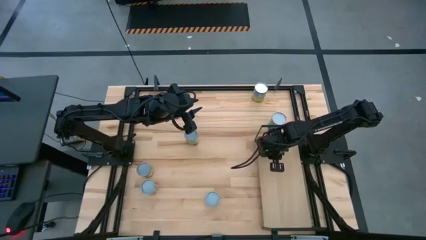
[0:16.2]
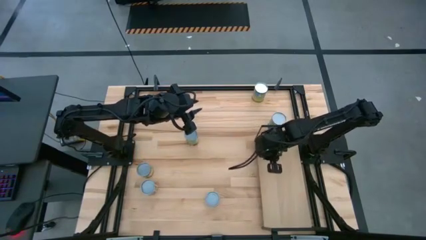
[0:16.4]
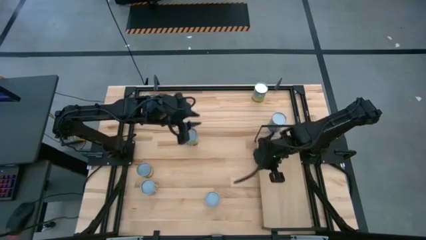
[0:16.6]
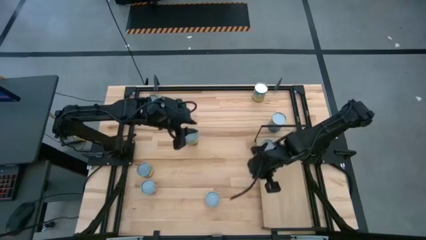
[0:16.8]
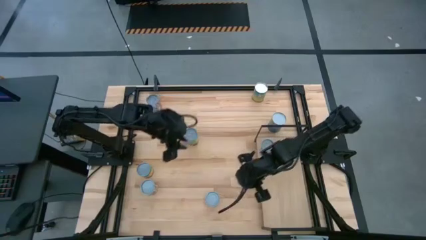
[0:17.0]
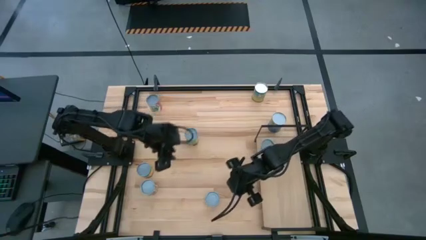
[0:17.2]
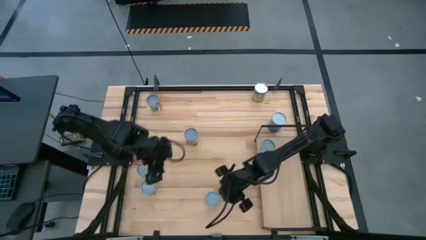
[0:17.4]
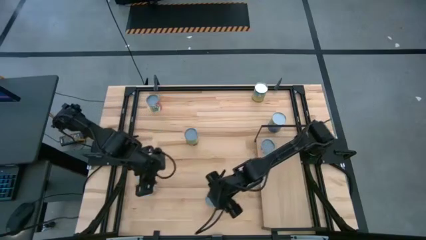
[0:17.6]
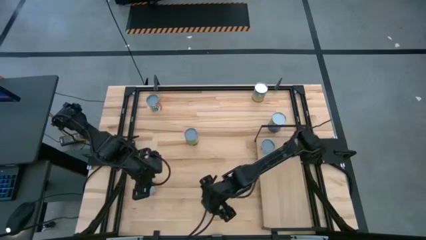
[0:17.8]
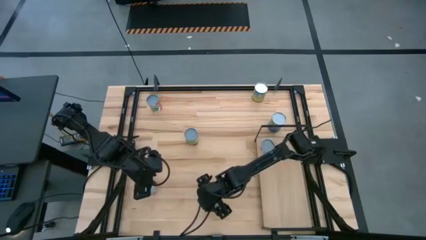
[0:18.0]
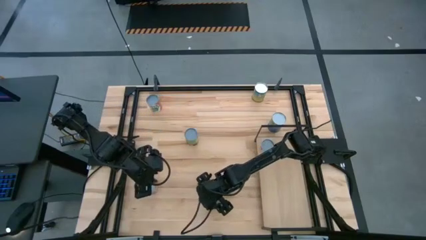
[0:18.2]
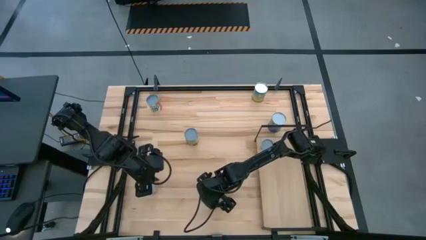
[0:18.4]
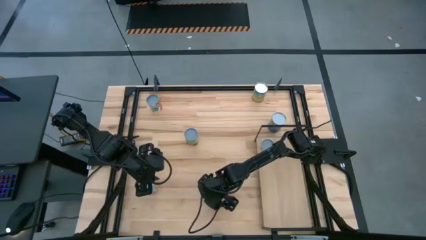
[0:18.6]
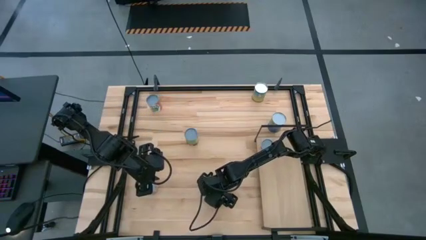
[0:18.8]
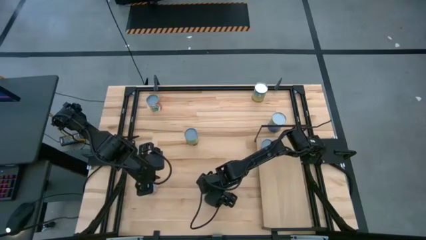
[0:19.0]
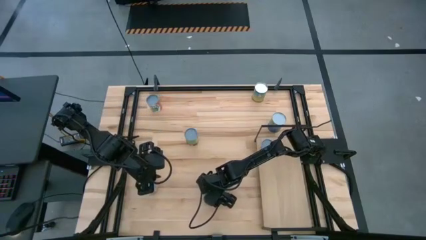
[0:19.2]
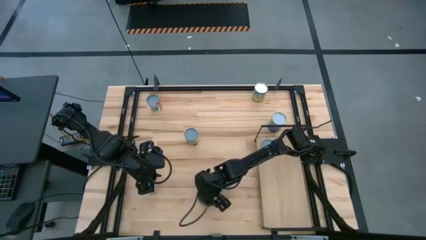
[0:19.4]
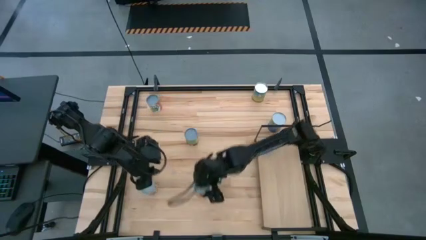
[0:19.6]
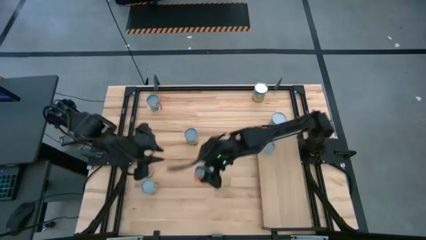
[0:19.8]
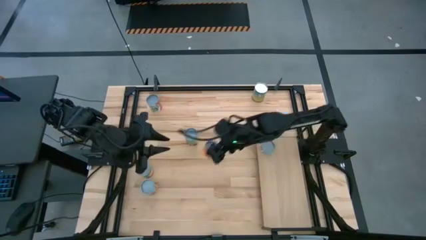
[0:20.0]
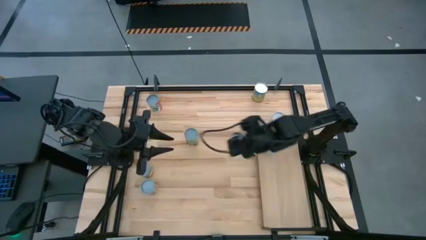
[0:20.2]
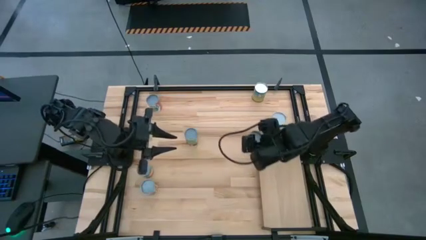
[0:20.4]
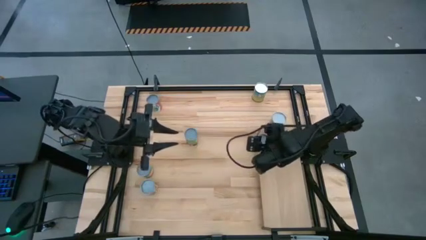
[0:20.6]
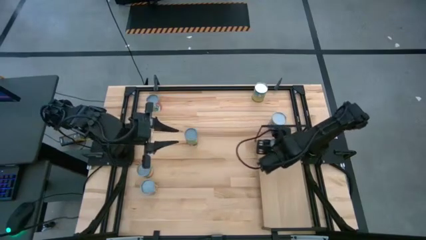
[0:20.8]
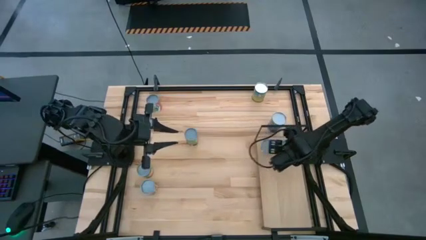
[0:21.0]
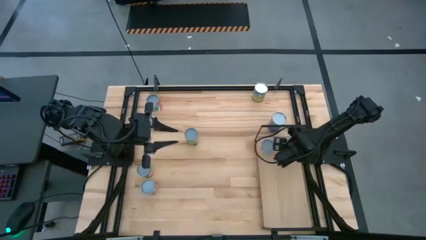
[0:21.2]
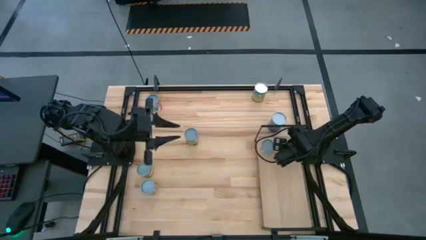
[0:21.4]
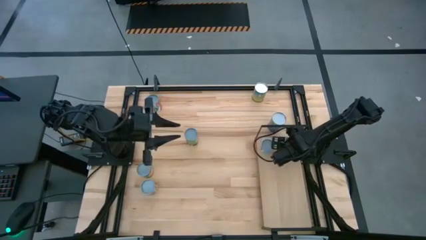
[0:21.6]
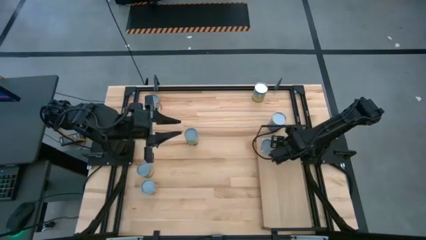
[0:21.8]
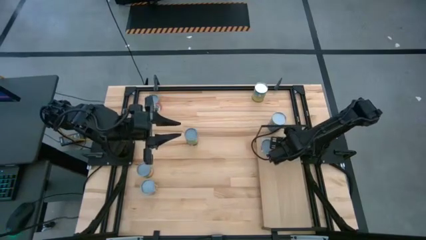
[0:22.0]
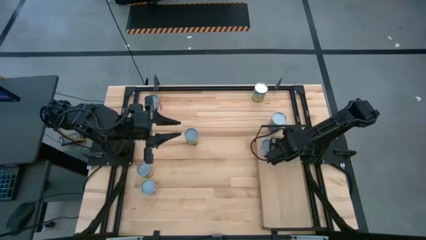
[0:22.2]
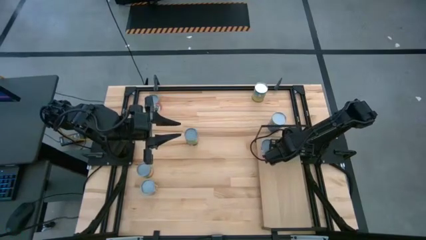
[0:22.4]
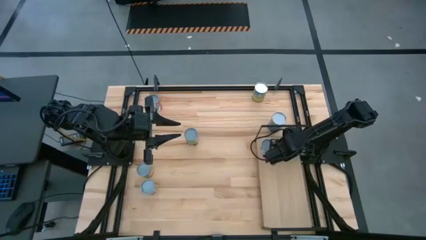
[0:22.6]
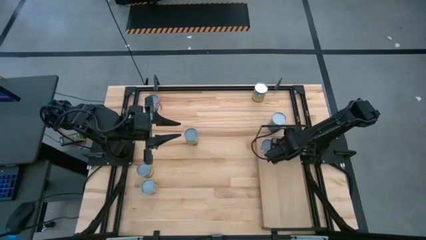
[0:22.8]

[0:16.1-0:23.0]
Task: Pick and place cans onto a shelf
Put the canned pineapple on the shelf

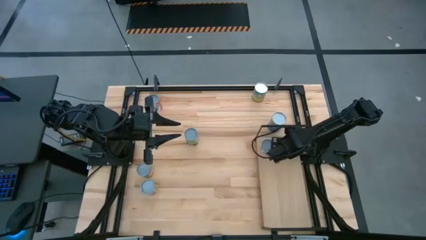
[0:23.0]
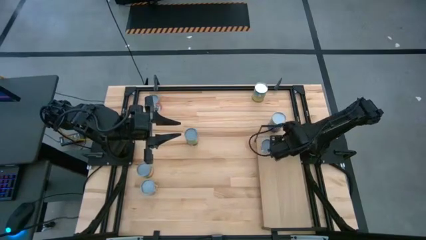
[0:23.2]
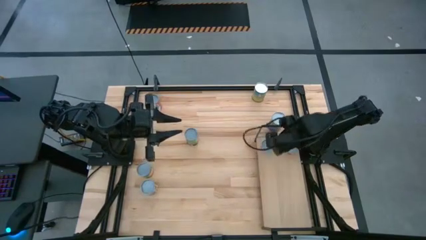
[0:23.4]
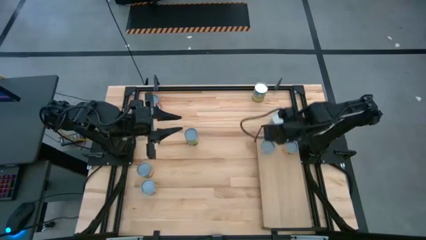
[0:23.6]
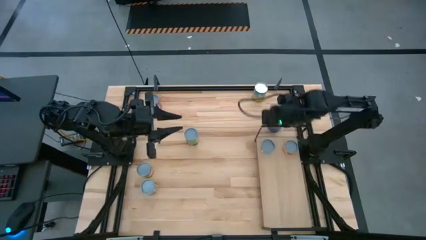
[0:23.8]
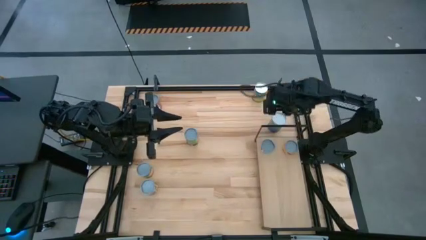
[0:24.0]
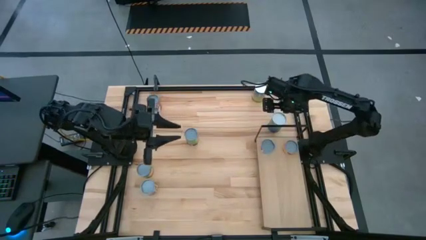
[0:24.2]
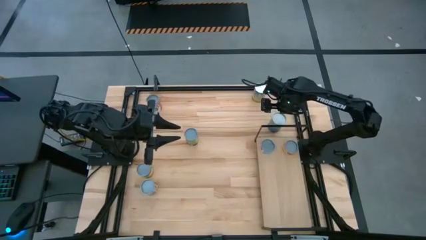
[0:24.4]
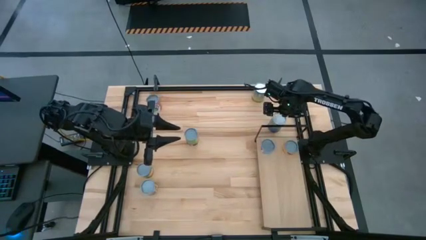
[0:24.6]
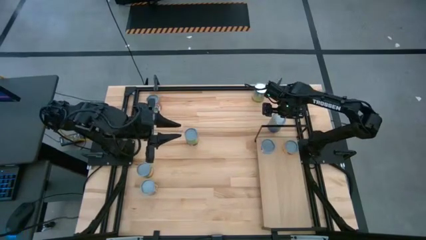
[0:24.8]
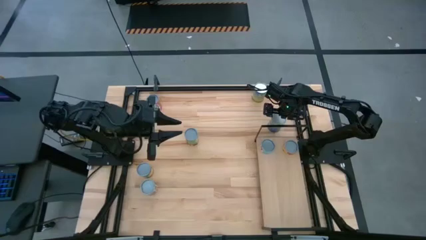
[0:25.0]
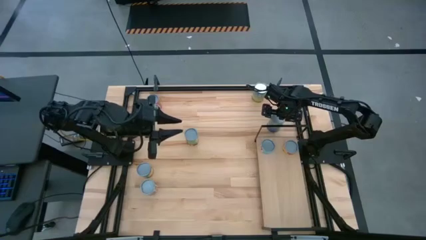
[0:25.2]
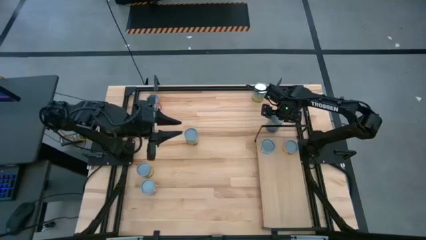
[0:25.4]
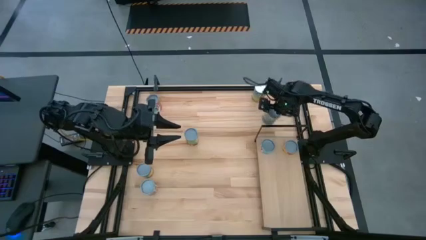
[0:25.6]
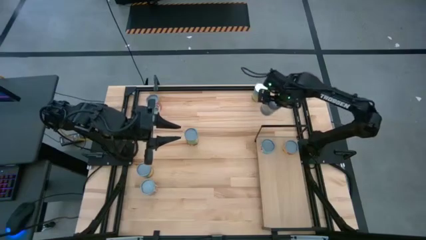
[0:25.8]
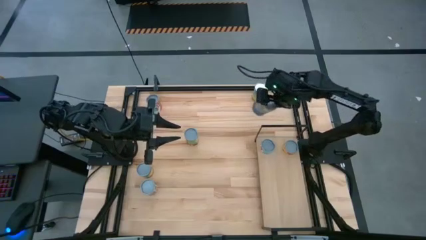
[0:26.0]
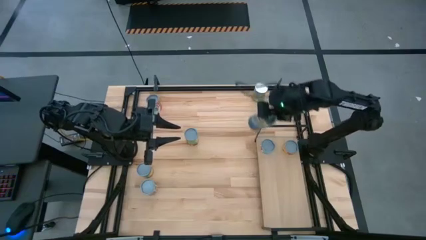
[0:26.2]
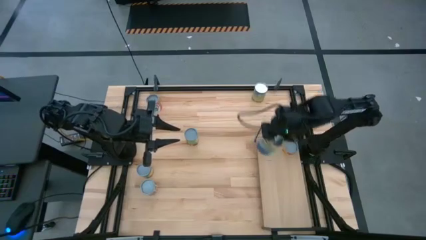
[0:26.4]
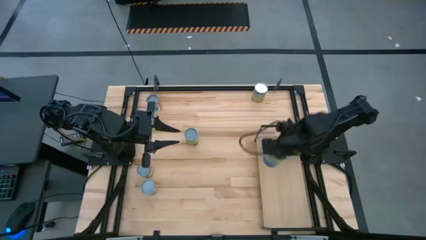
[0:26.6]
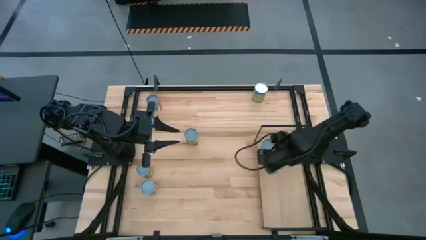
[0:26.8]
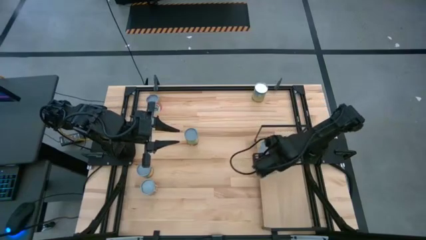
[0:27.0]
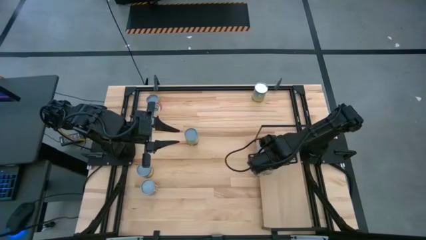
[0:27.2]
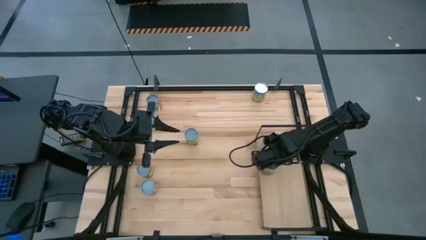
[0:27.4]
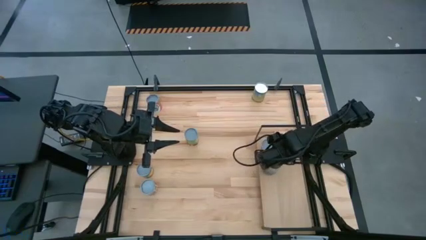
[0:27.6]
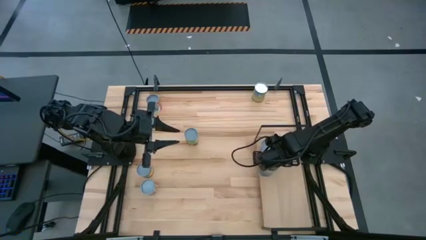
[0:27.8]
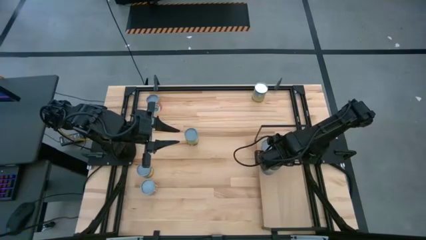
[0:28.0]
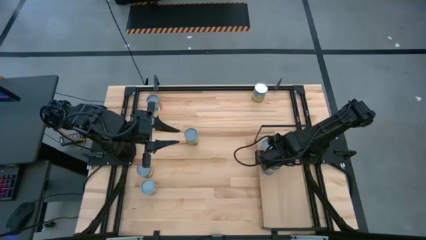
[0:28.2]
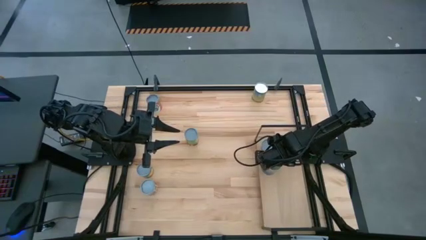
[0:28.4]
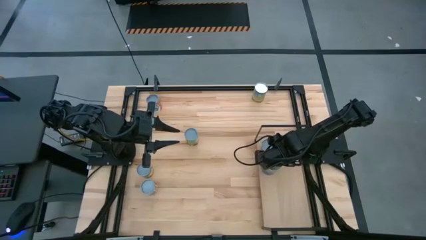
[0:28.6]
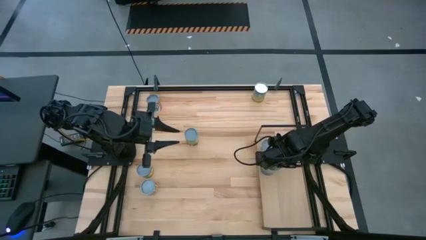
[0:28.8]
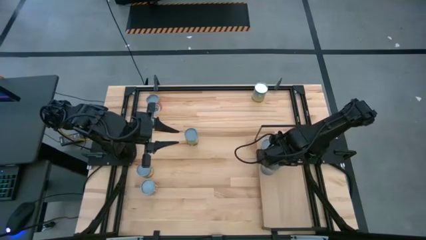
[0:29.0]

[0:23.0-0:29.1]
Put the canned peas on the shelf

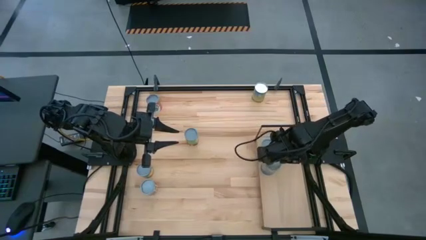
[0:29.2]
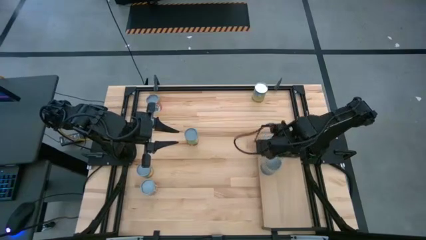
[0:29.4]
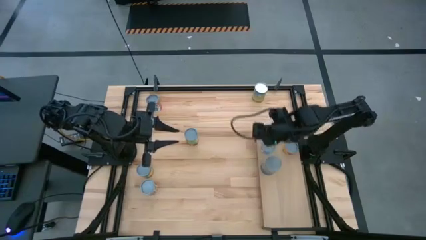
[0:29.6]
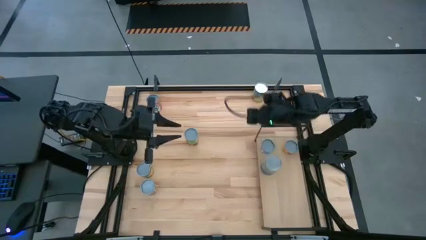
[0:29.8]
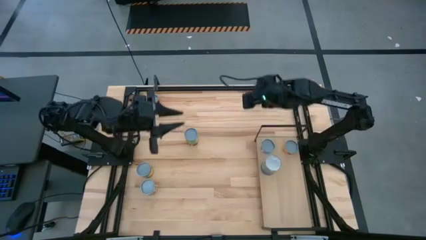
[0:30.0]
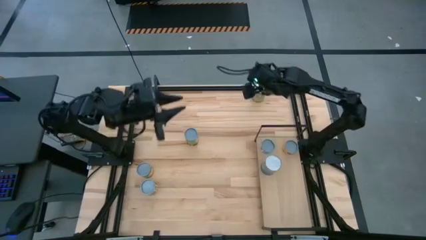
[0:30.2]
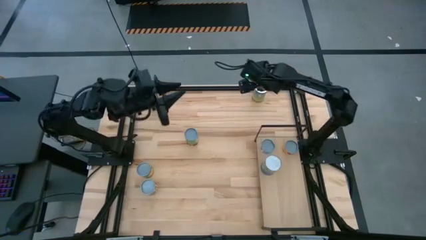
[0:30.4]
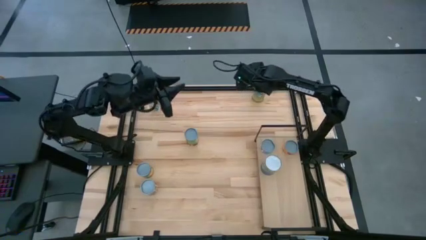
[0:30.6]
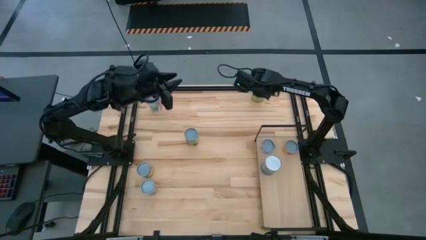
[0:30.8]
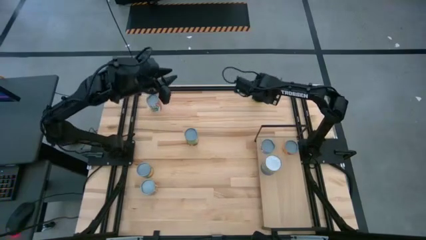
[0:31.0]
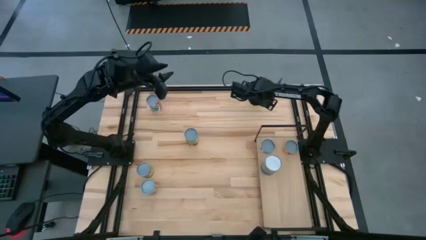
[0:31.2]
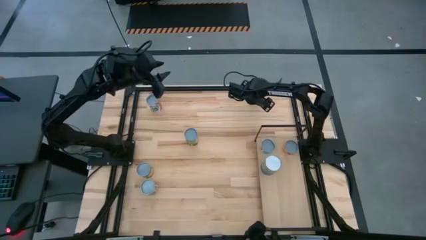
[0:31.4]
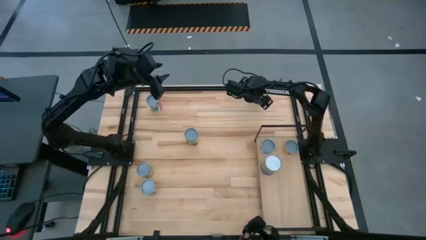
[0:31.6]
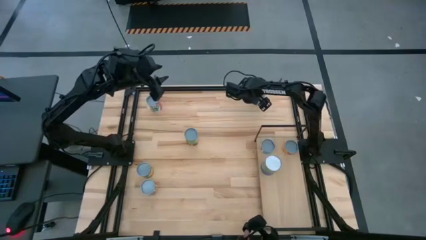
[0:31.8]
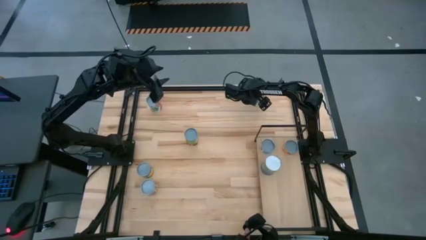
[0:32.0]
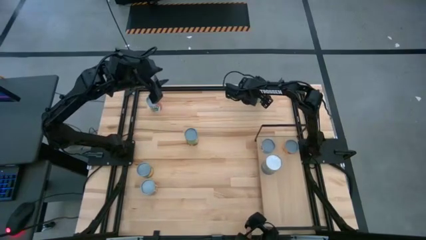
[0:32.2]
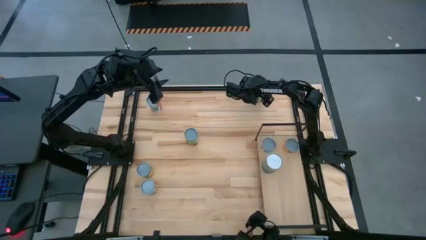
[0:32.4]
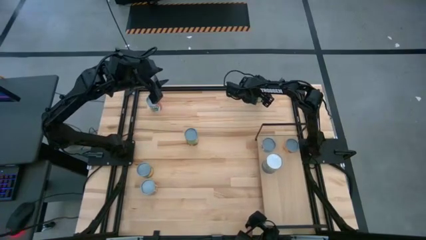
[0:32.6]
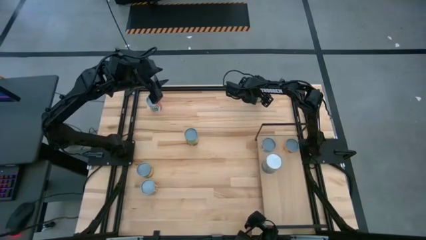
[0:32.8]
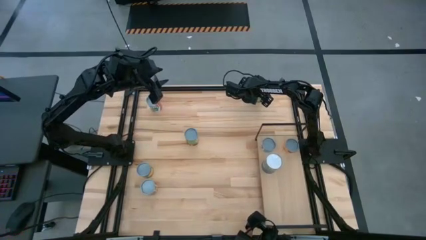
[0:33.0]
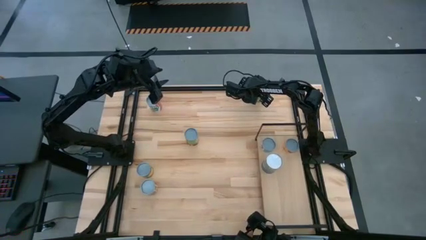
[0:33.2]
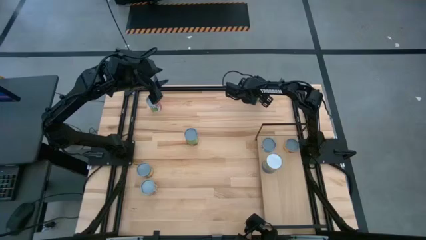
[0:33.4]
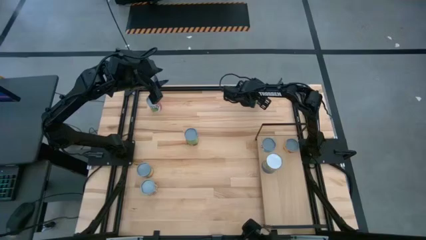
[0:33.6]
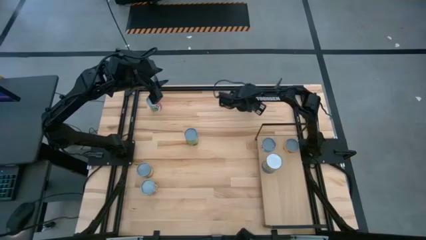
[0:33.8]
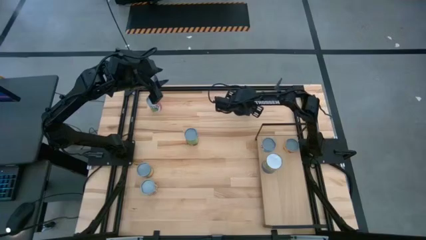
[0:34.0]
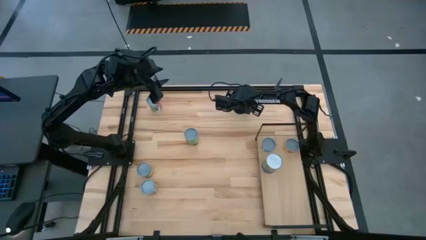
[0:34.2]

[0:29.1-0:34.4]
Put the canned carrots on the shelf
